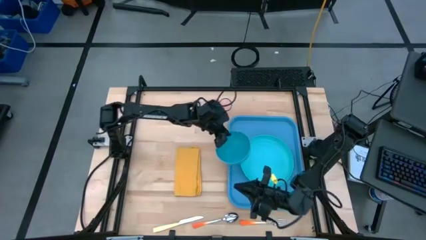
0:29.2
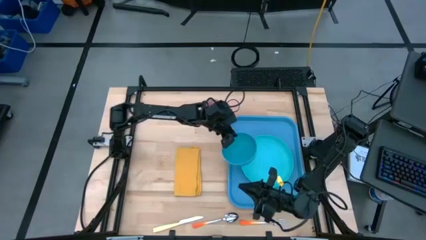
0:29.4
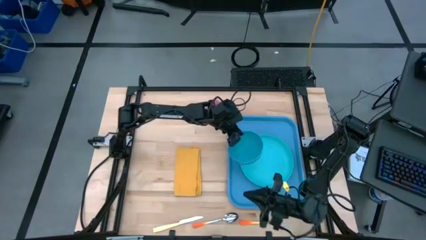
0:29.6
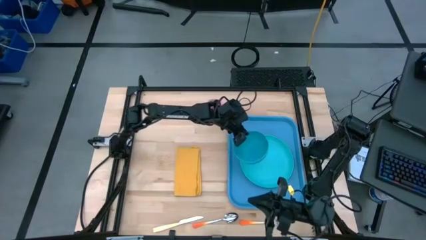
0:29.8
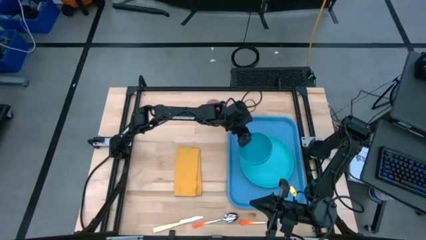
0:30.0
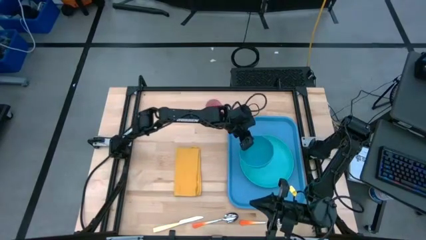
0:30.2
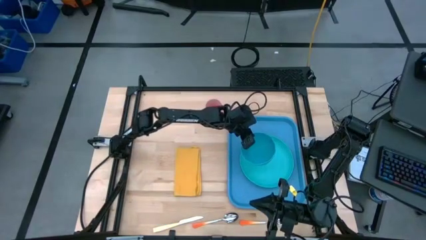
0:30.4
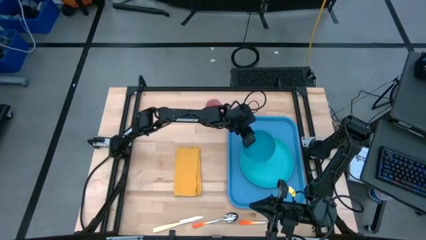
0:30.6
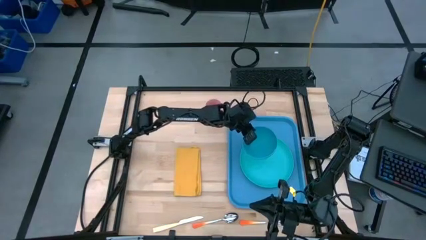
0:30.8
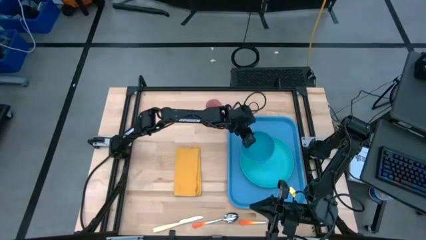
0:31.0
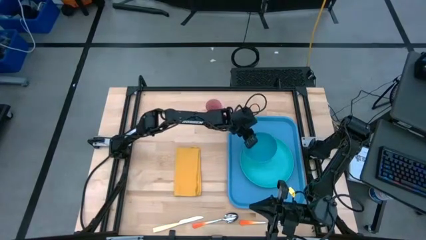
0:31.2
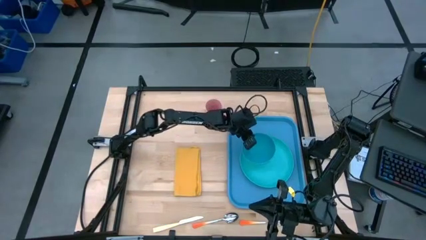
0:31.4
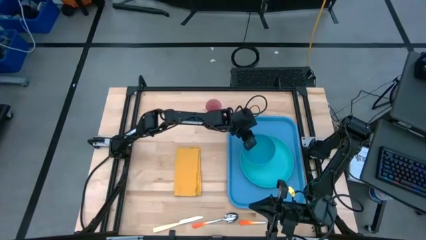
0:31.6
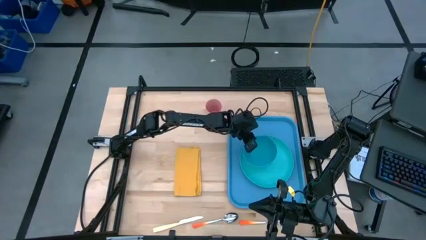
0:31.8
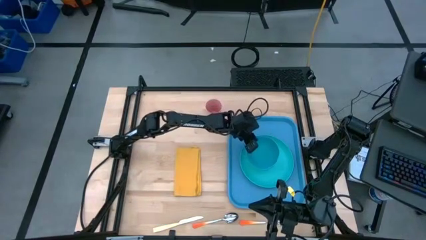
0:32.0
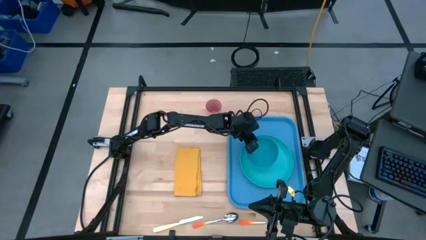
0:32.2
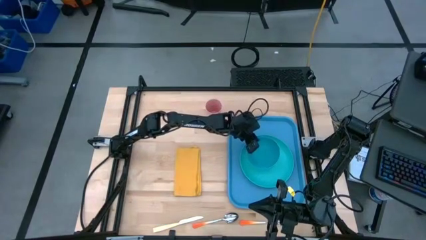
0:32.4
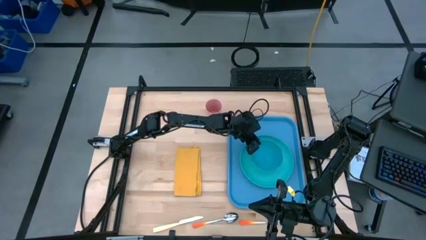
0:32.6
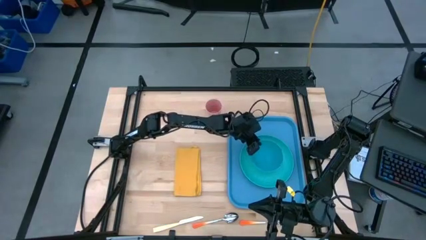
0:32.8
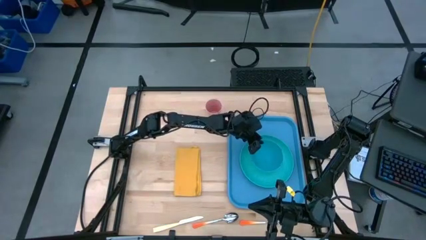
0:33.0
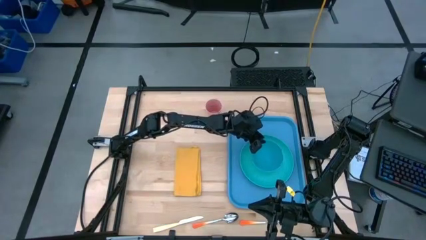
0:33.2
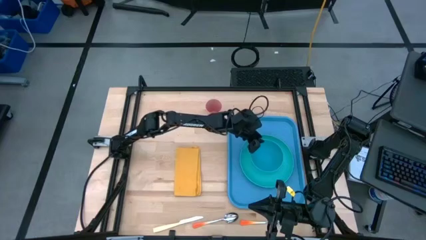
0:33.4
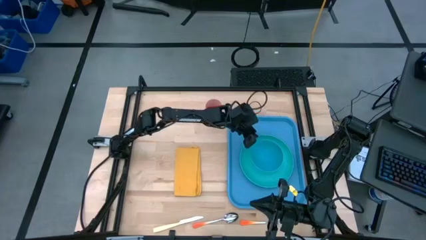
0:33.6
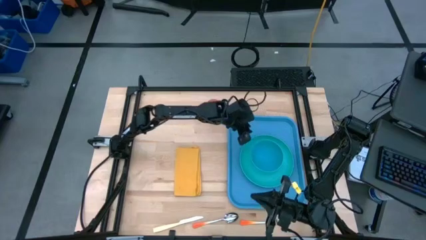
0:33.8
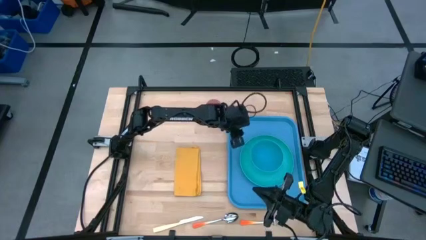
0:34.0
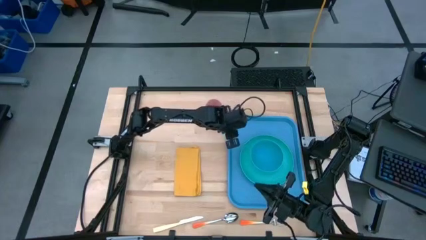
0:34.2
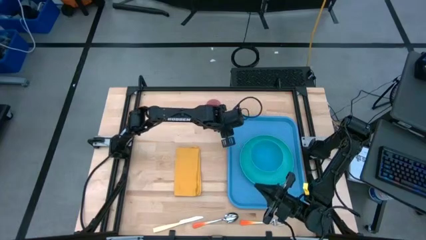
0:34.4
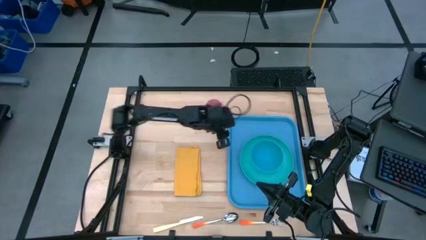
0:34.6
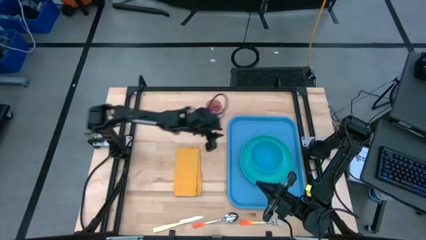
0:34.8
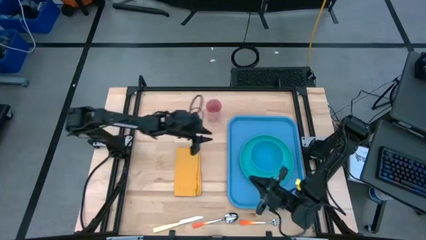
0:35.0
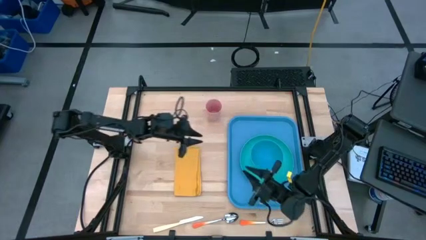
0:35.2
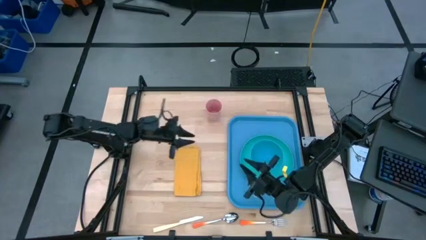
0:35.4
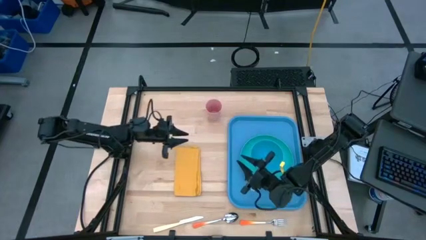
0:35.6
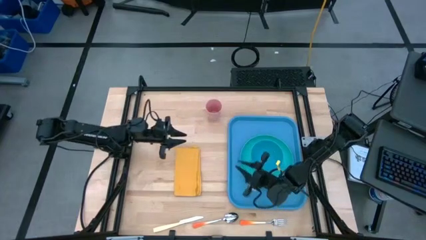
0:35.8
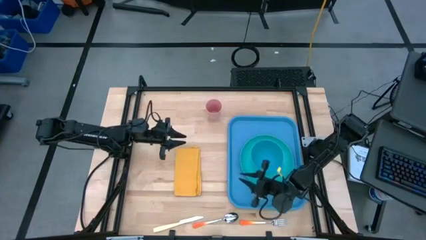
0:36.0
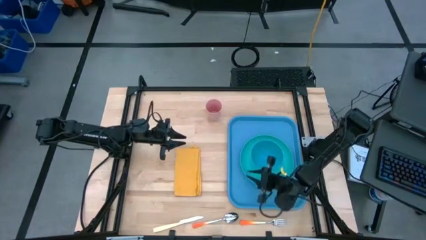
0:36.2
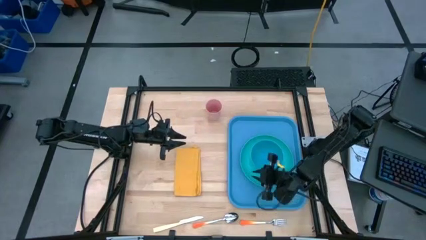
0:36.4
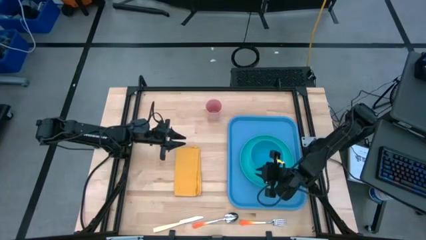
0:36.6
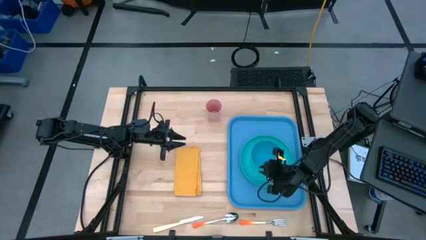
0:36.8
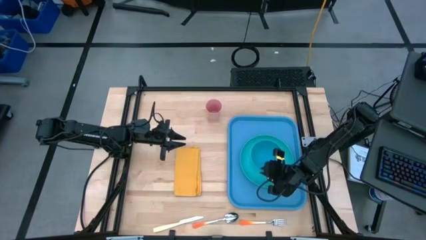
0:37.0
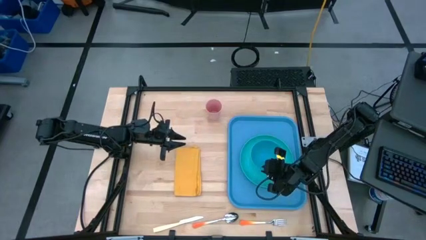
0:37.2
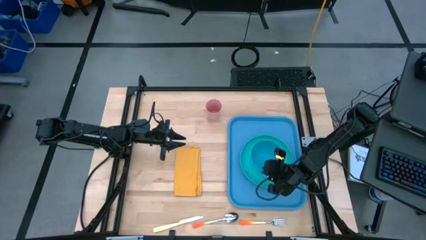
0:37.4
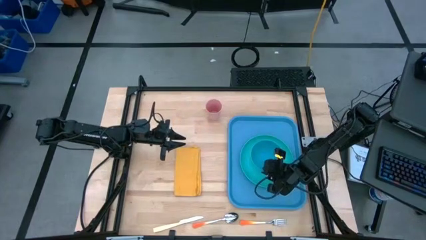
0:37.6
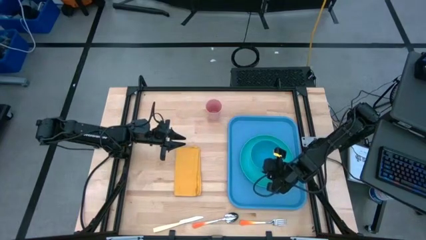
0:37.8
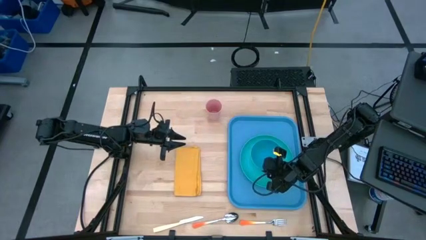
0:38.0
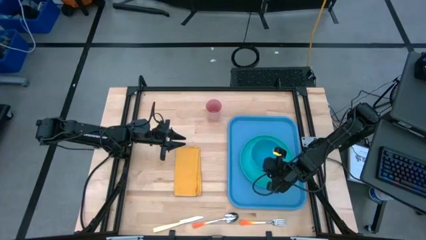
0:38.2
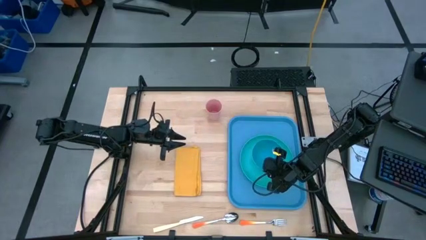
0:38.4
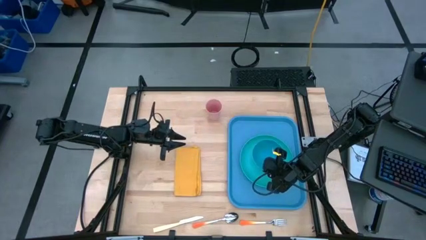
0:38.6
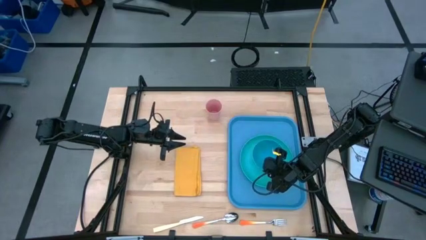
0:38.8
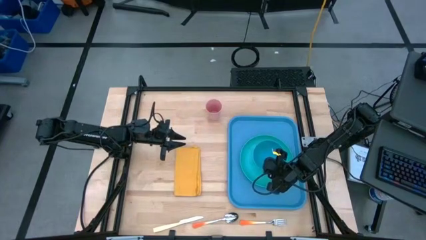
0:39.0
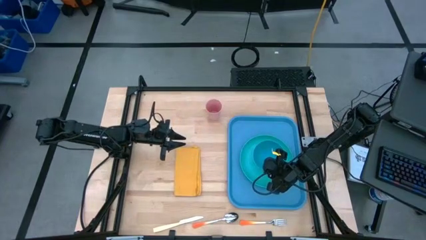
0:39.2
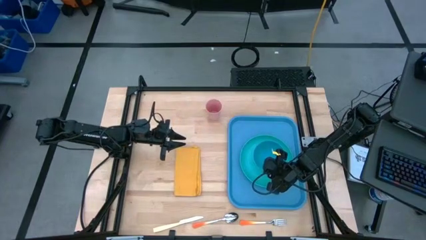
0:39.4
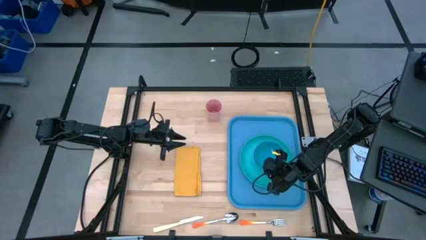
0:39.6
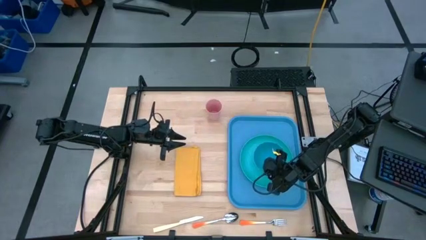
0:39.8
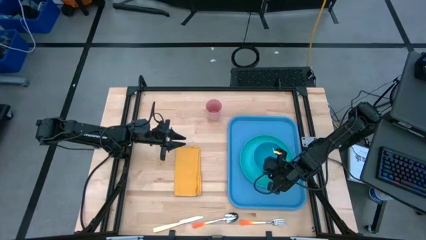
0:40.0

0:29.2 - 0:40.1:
Task: Set up tray
Put the bowl on the blue plate on the blue tray
